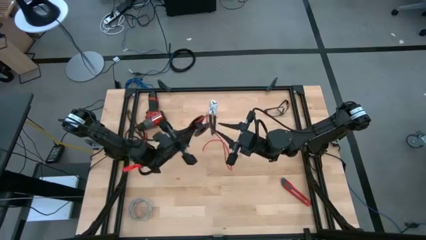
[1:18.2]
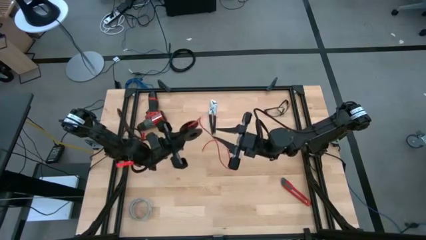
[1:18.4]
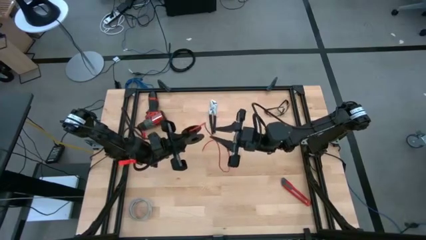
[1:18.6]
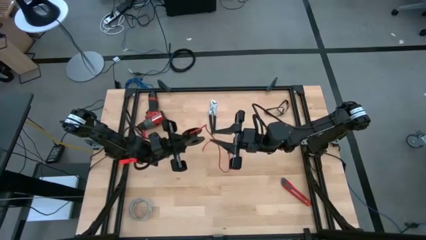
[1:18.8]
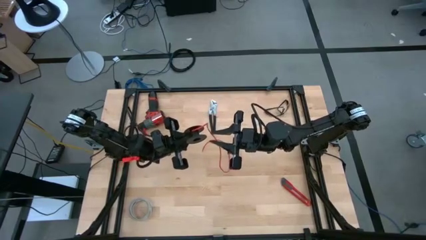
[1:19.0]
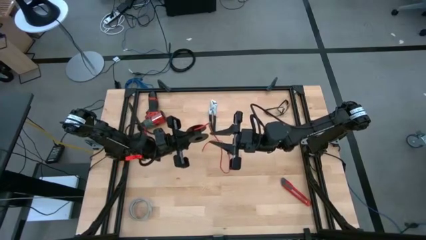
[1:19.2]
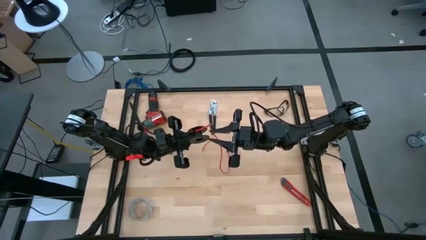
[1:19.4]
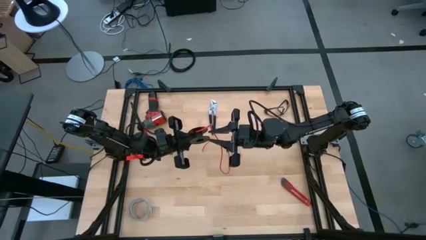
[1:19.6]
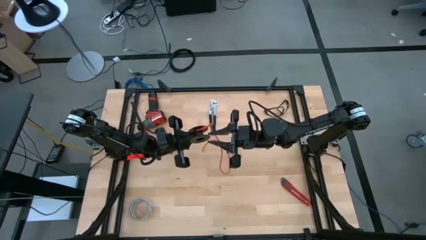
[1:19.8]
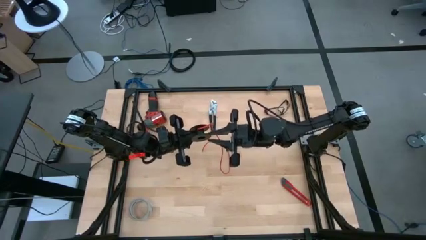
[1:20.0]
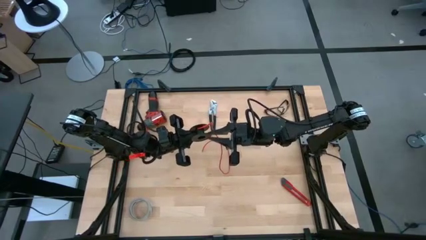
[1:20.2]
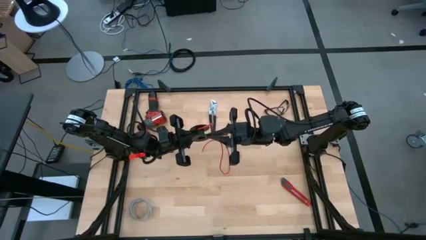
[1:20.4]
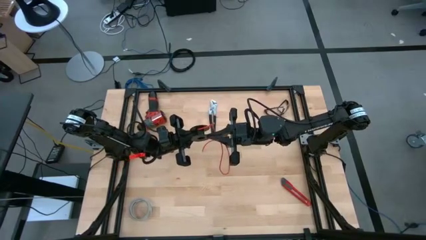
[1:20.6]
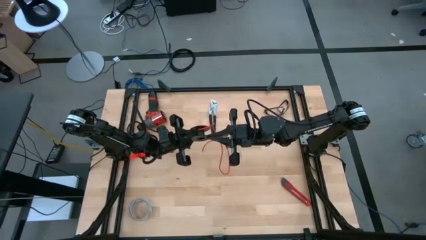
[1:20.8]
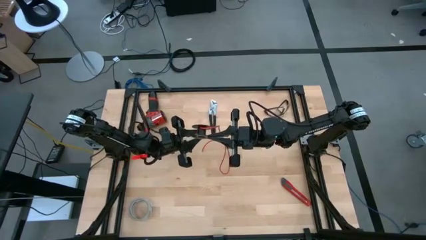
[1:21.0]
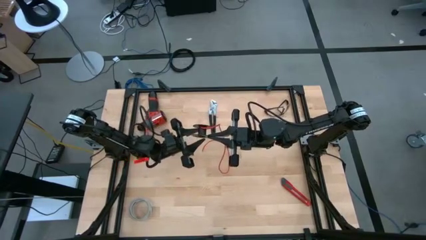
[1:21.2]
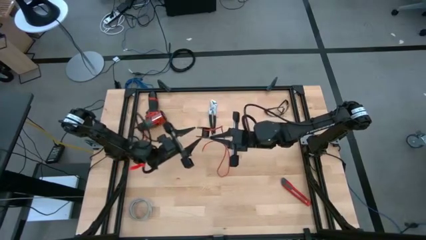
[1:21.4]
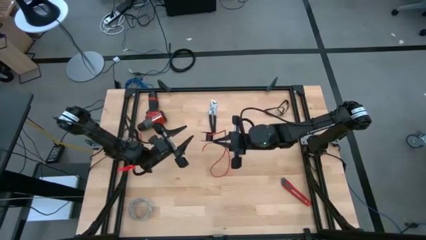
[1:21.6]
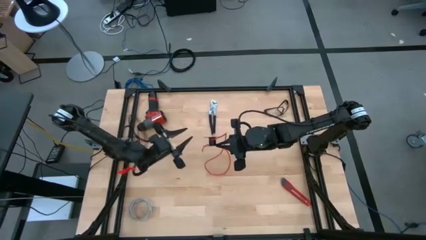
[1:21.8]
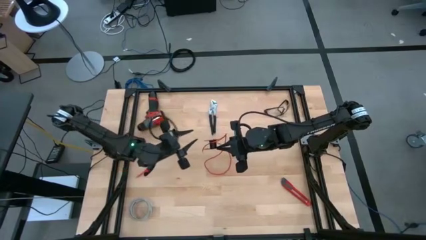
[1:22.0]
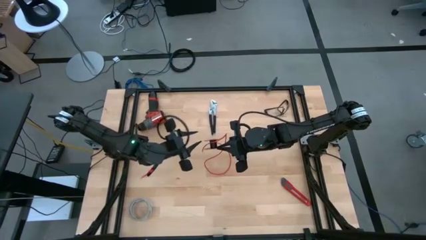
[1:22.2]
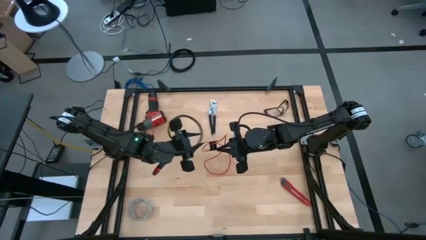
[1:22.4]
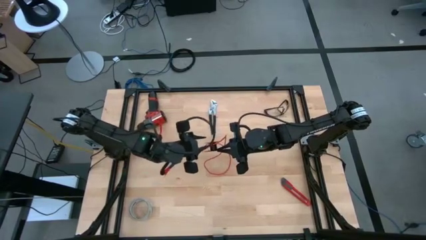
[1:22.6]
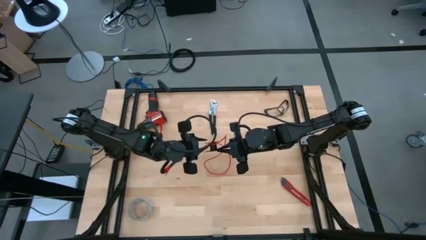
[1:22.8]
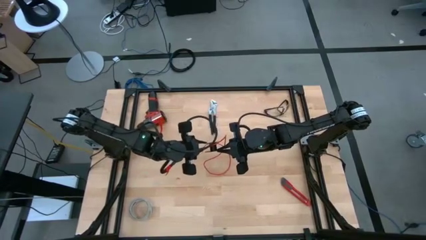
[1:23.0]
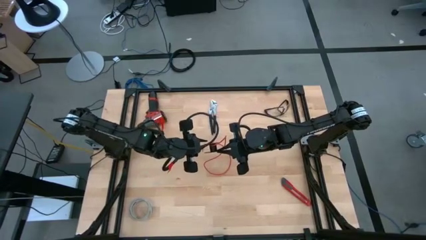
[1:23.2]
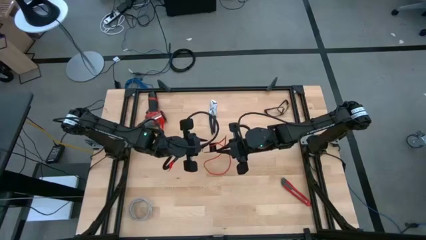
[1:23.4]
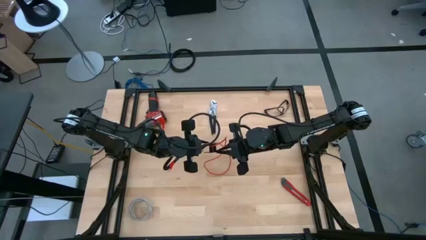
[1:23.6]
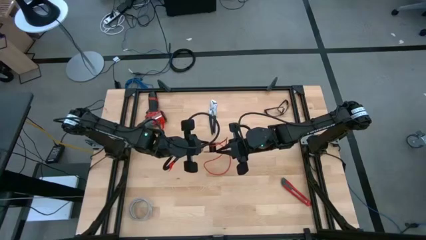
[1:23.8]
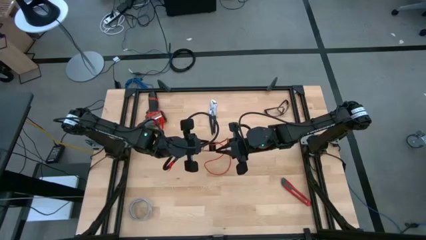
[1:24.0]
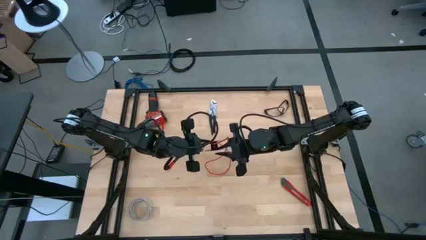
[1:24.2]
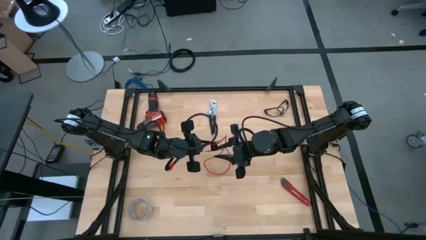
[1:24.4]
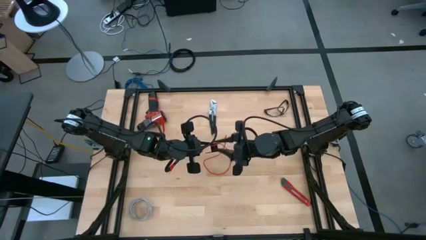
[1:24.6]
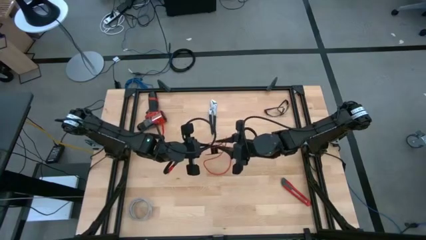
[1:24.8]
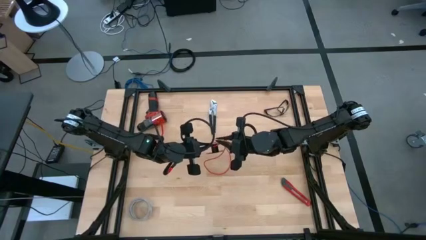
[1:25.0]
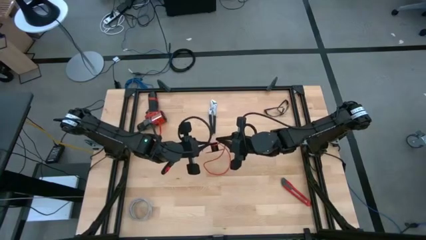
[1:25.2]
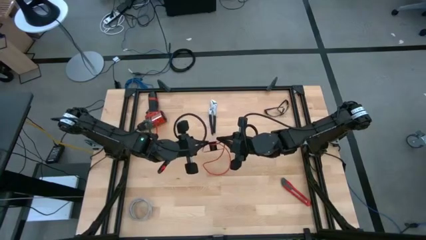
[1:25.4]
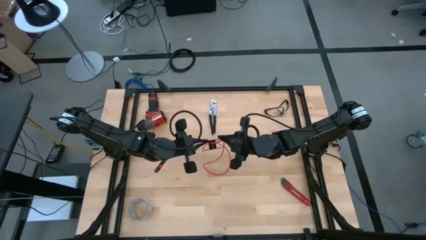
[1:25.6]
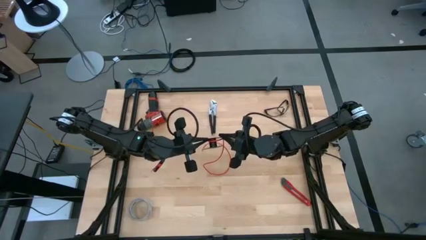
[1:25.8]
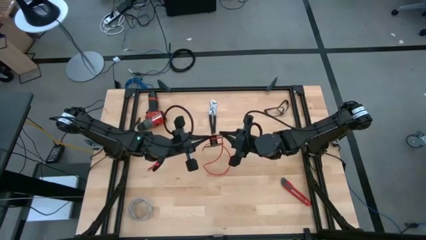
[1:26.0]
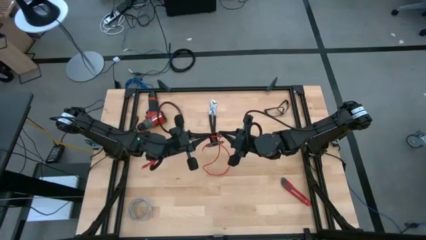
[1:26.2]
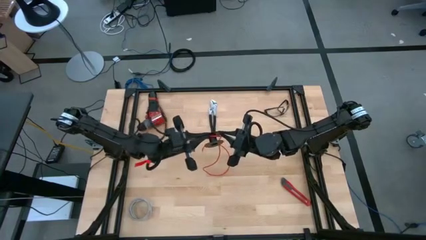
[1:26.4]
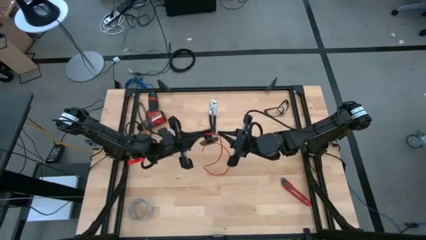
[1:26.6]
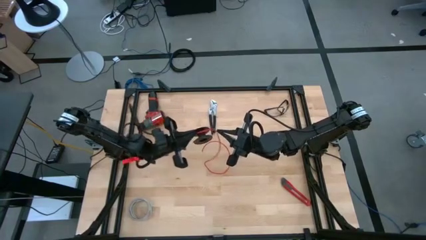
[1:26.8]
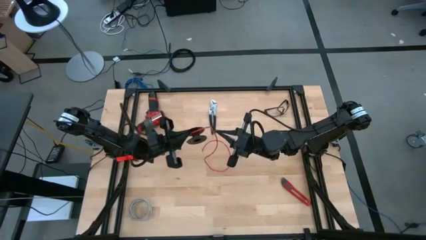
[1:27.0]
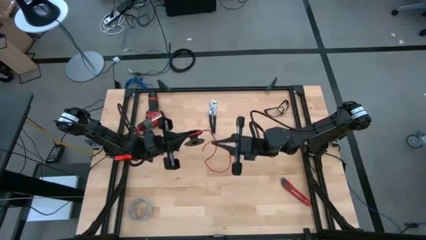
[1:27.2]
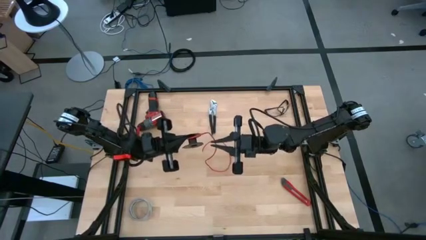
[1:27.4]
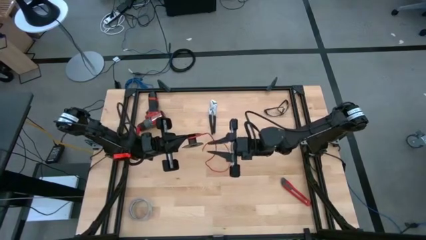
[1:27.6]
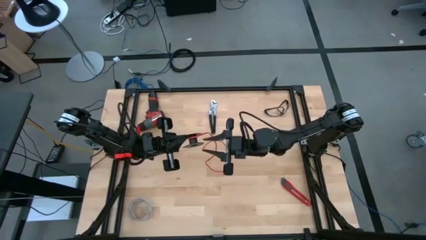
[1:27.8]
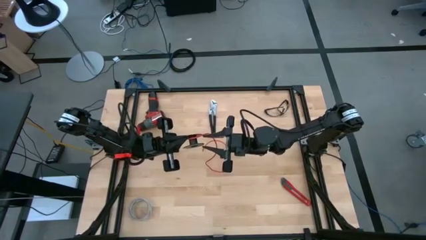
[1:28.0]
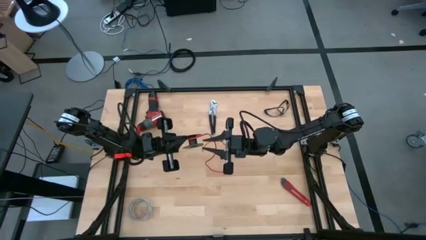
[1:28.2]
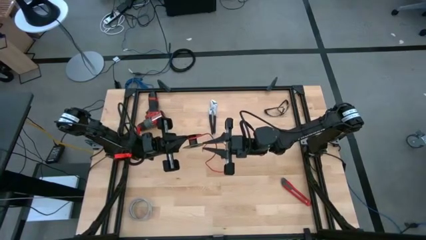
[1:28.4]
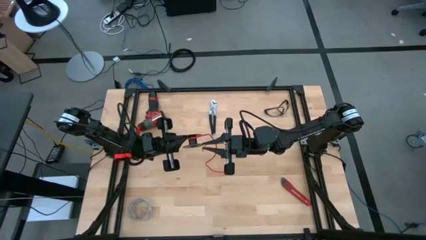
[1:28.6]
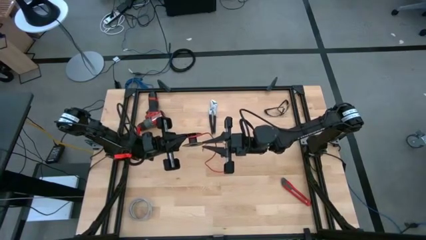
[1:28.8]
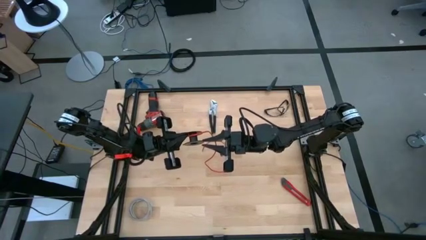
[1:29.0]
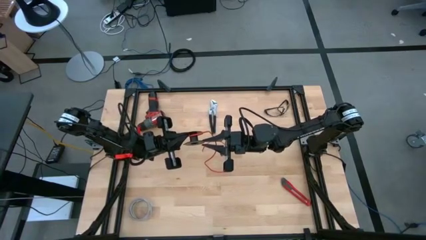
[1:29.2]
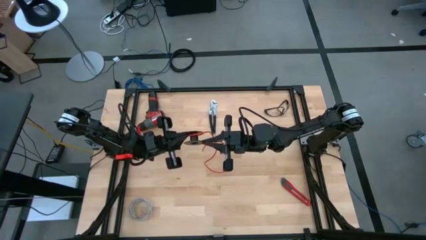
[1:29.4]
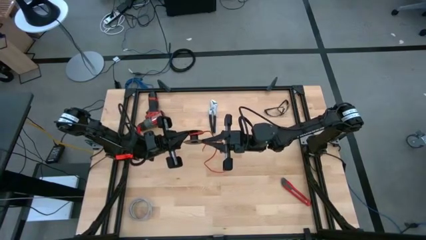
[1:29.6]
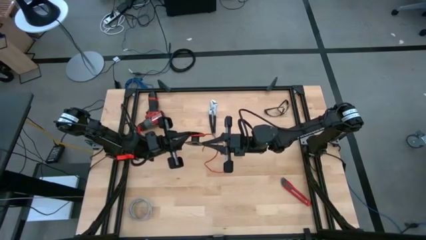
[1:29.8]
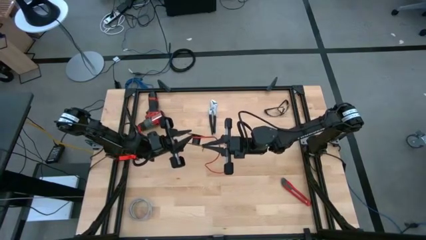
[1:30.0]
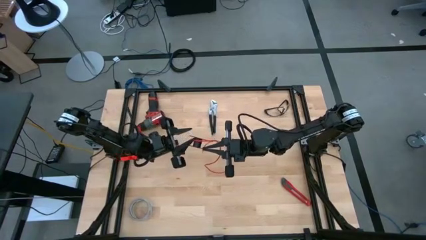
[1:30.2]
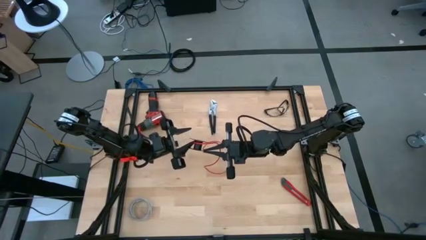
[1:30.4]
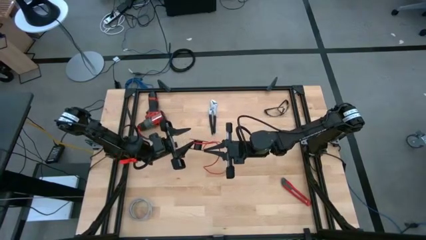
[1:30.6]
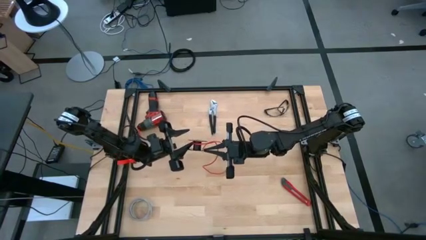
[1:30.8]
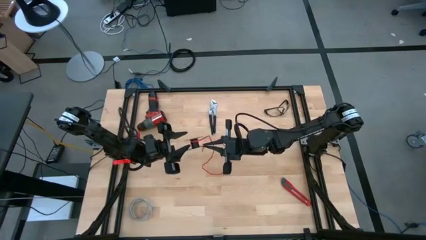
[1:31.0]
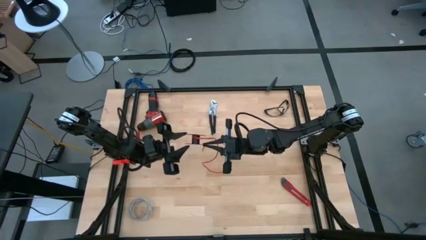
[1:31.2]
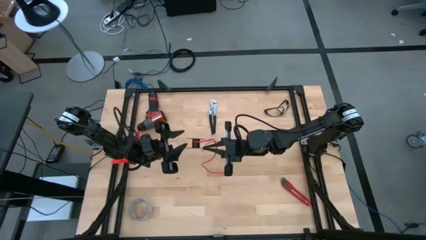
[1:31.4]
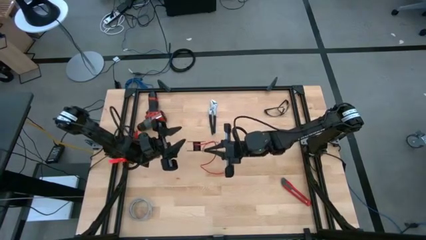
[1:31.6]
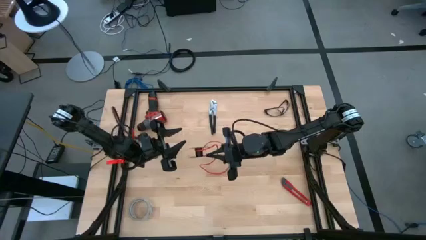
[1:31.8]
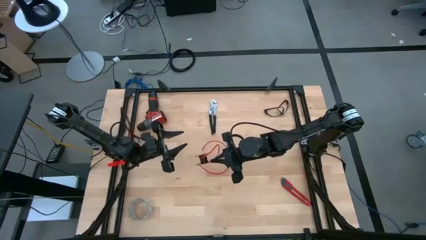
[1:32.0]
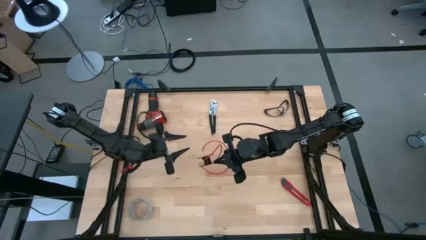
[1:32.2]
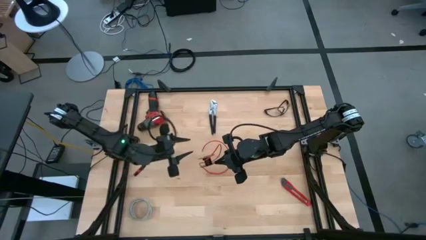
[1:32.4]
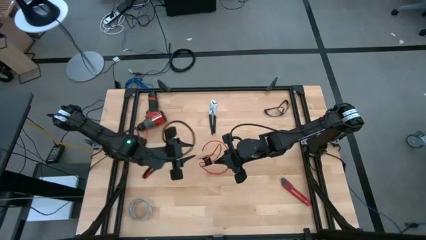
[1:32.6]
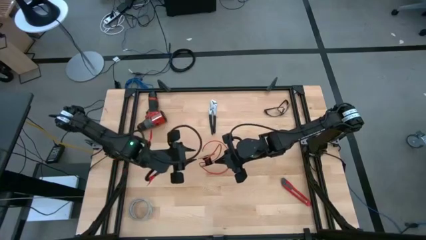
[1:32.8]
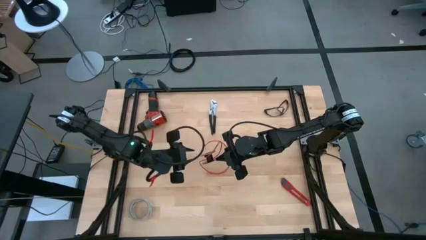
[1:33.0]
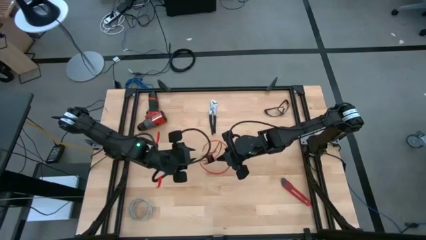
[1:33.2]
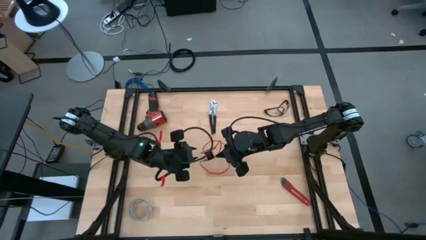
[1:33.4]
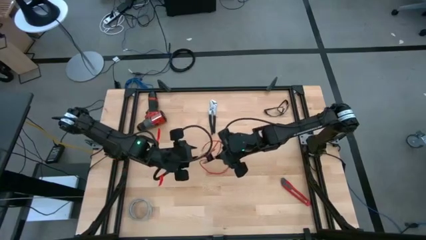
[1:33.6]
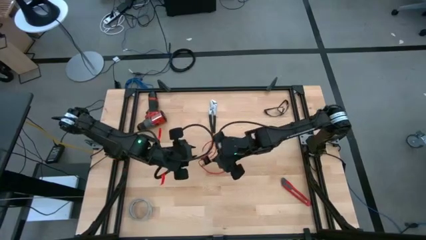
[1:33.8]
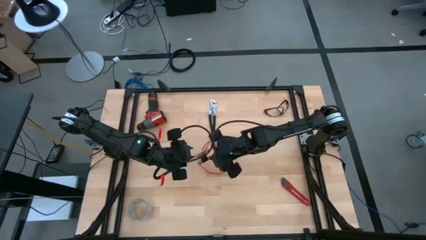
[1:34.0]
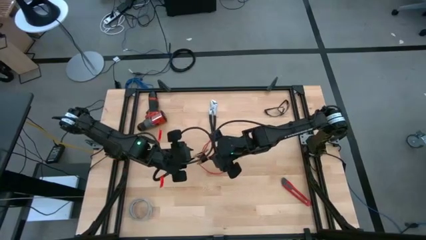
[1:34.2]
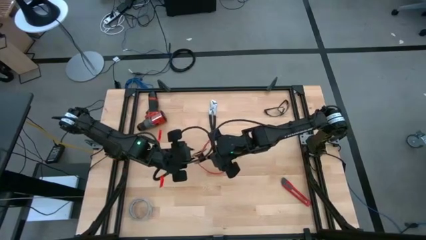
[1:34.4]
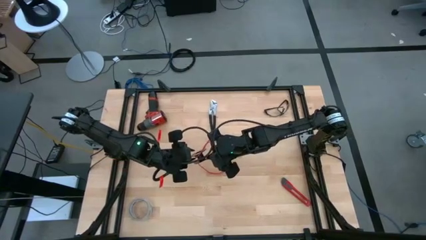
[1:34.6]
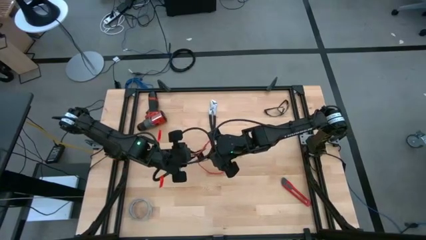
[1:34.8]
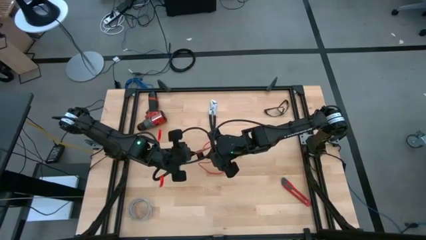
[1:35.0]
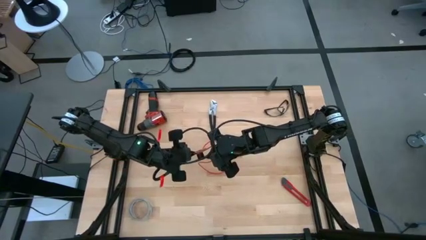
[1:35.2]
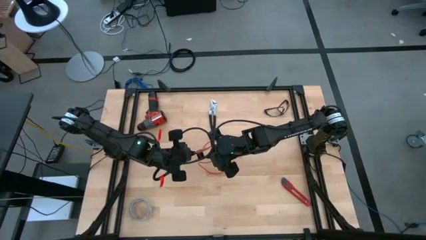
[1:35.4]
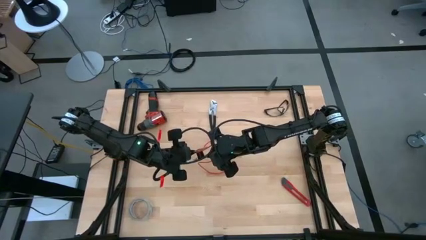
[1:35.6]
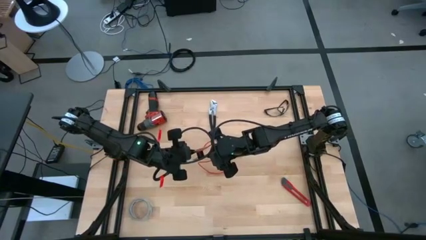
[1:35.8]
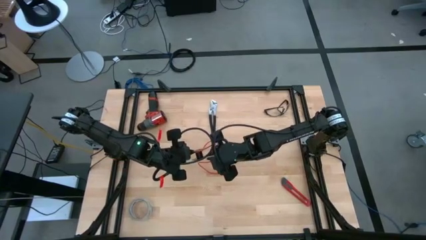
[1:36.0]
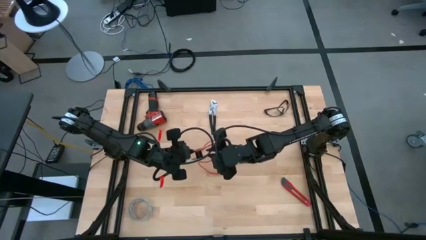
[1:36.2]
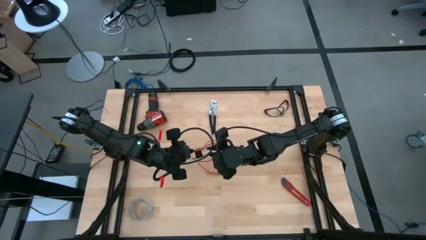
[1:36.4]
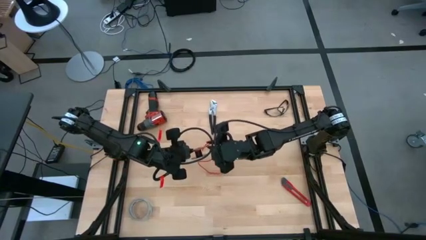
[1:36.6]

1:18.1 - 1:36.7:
Task: Coil cords
Coil the red wire onto the black spool
